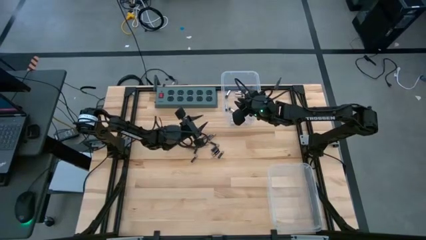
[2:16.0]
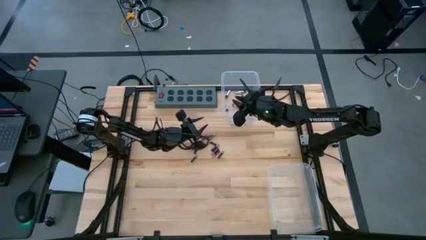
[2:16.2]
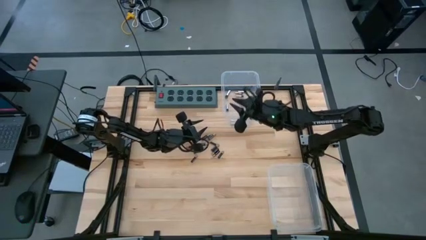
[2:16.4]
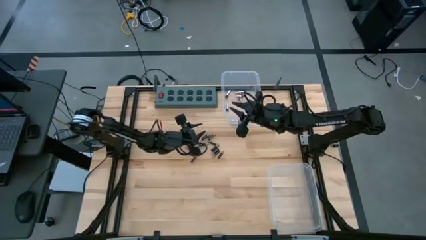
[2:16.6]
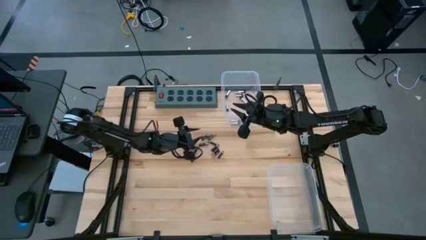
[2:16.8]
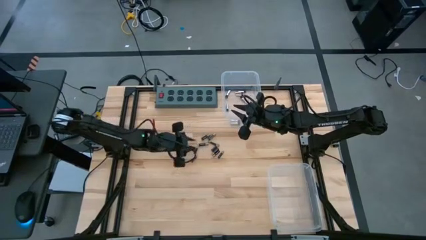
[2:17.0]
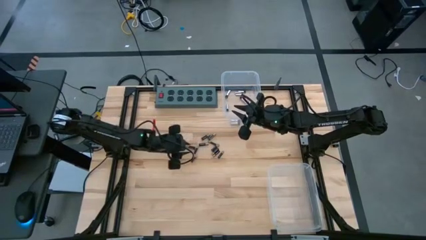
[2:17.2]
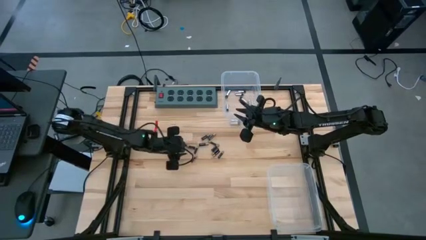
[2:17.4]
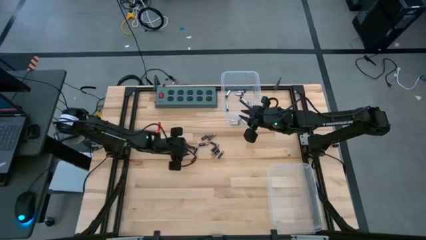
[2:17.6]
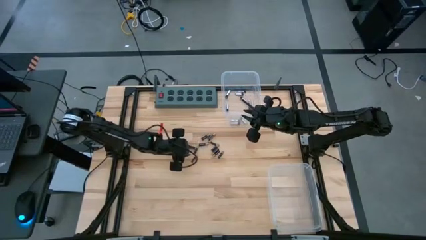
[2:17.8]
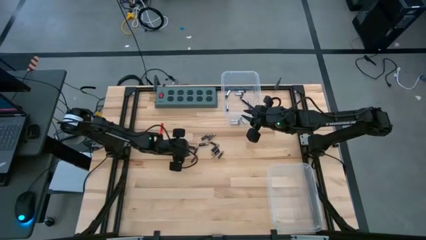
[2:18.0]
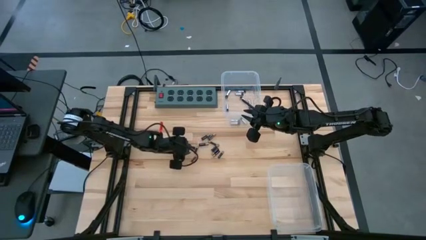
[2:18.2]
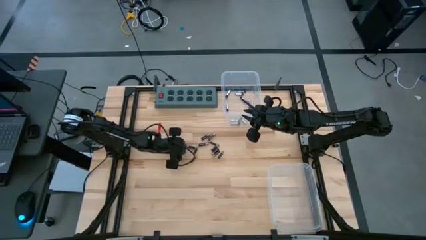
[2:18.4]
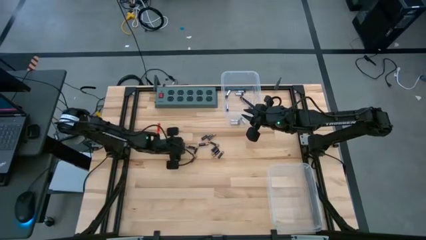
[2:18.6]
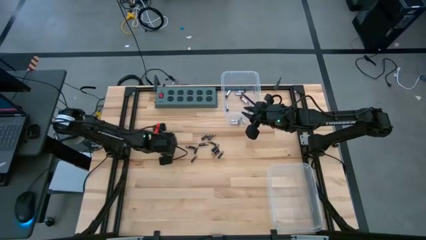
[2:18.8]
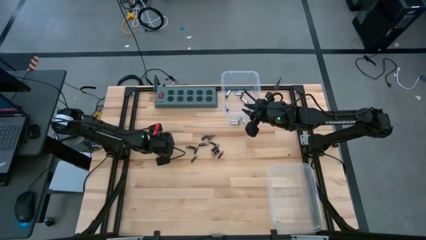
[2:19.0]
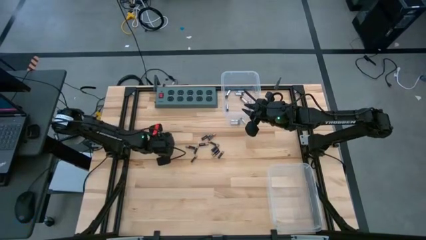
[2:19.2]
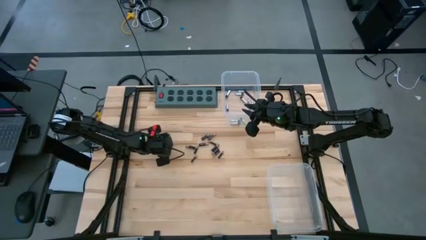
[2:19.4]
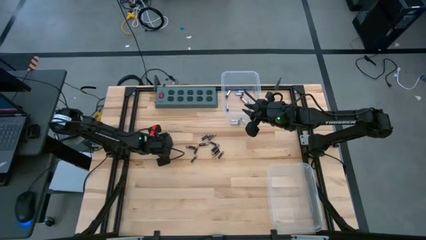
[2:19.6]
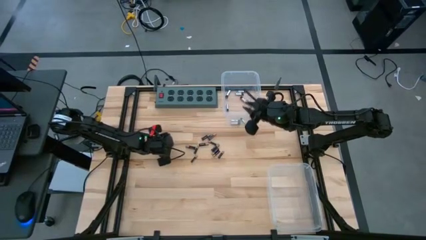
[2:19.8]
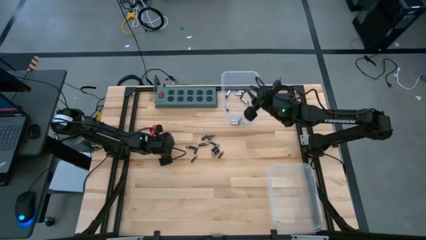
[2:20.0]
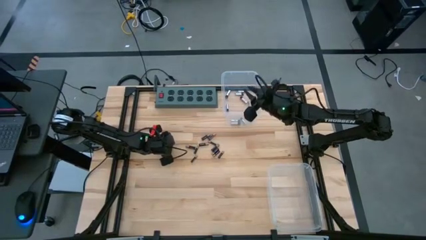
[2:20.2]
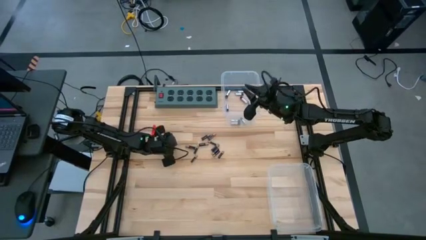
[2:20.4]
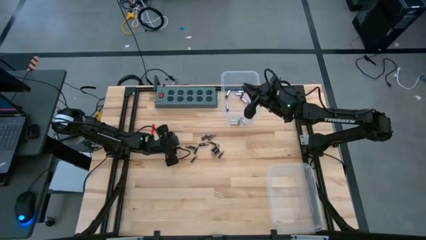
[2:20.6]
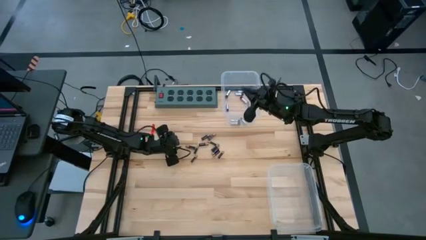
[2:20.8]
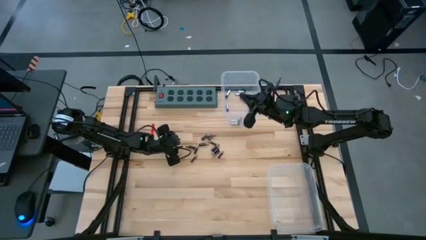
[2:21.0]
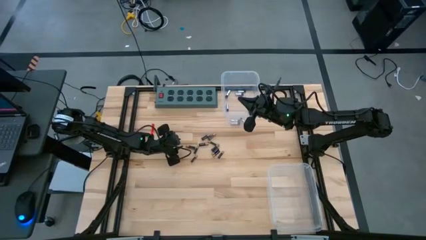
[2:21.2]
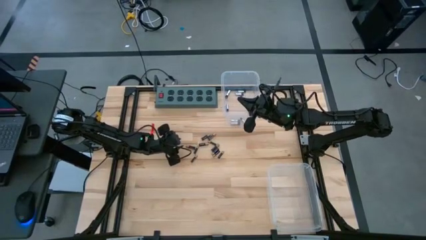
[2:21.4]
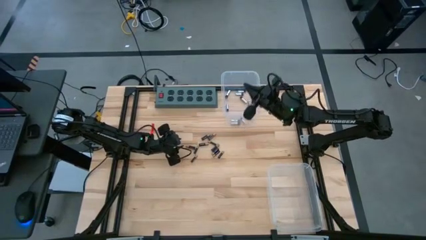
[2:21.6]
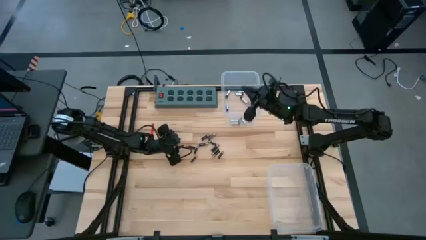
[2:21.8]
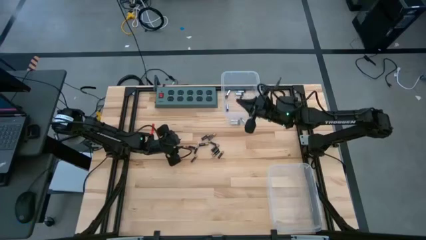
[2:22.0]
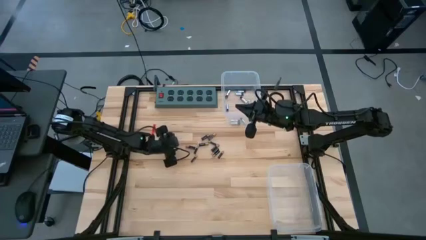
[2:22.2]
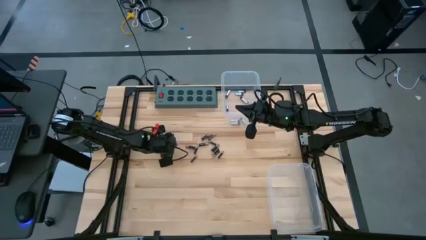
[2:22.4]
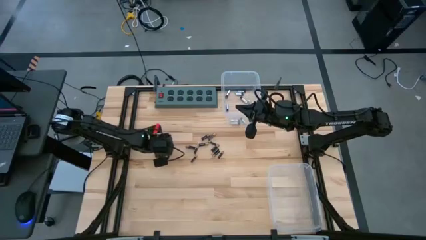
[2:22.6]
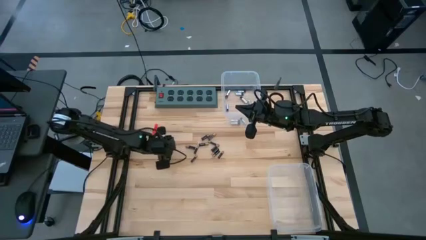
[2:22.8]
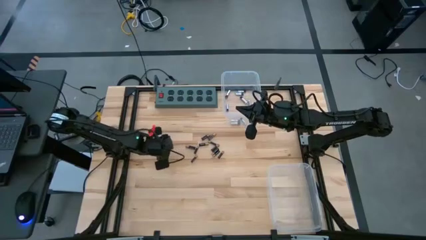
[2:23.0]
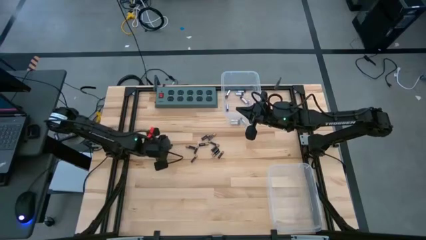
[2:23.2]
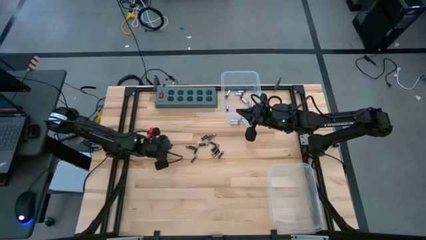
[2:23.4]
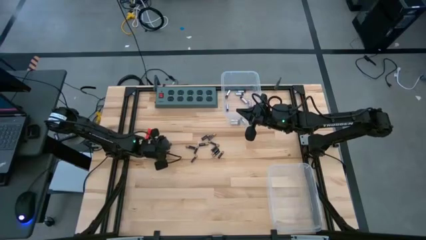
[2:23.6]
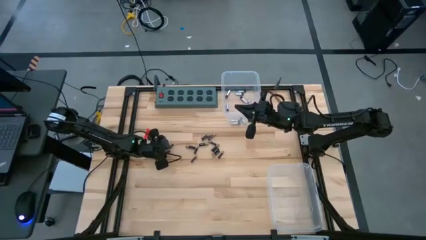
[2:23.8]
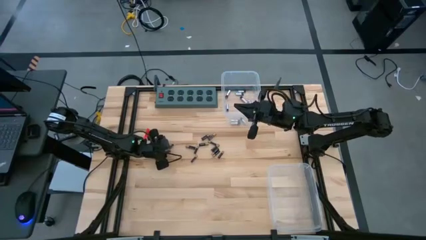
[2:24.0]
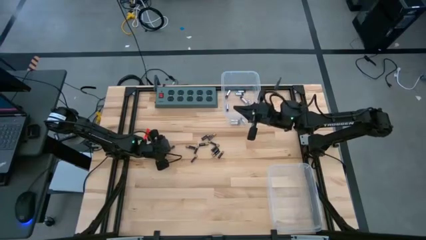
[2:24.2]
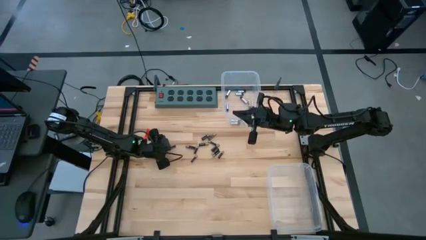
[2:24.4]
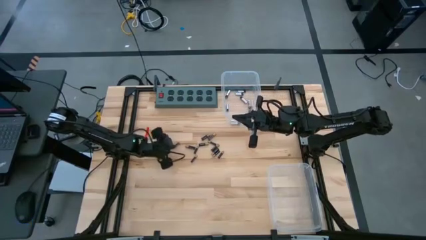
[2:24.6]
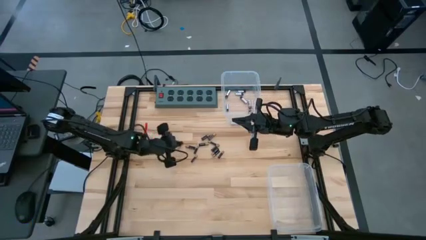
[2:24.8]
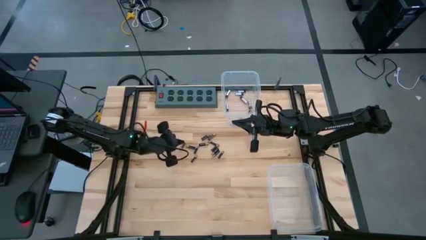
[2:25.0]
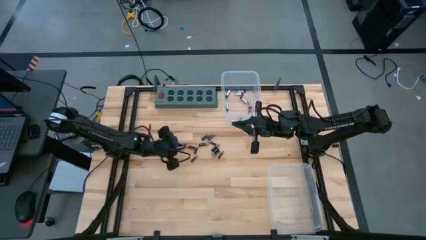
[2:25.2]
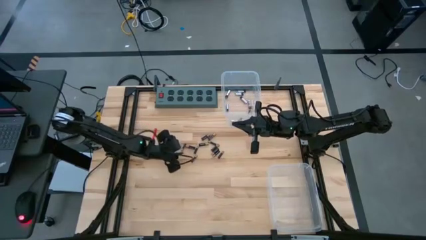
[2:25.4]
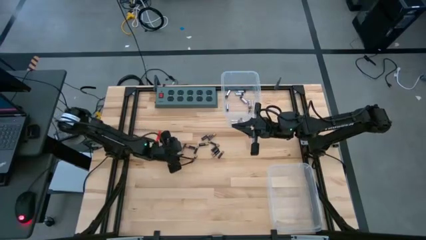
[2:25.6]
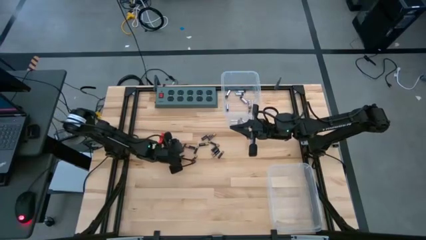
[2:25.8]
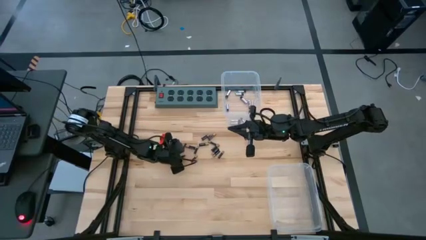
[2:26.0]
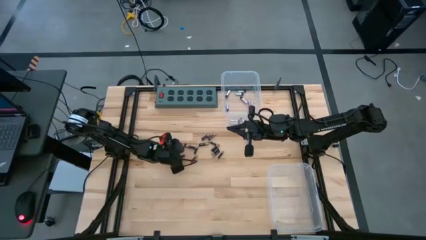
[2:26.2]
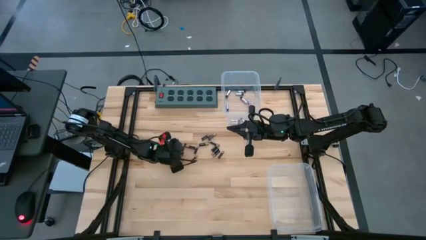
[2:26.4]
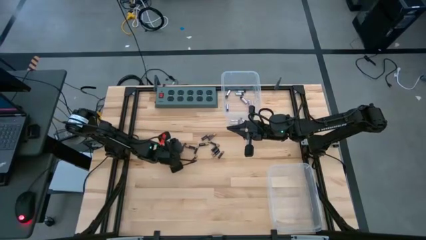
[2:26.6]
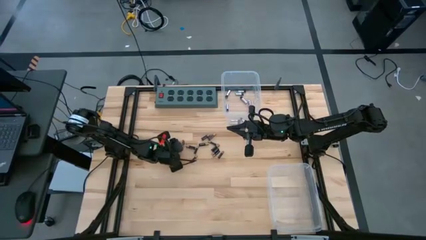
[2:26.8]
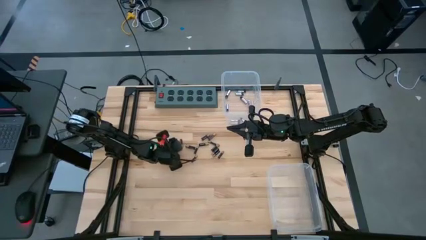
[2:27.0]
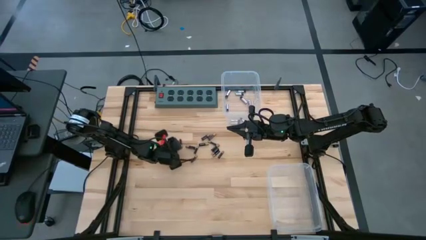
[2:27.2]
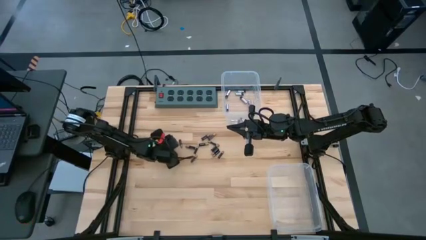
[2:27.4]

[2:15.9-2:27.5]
Task: Sort batteries
Put the black battery into the bottom transparent bin

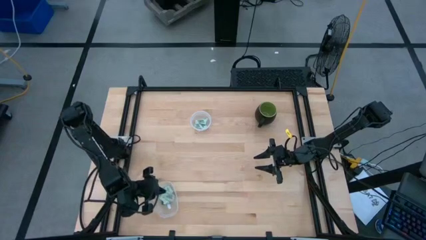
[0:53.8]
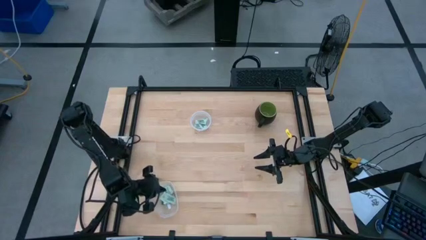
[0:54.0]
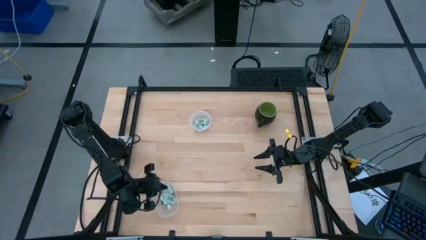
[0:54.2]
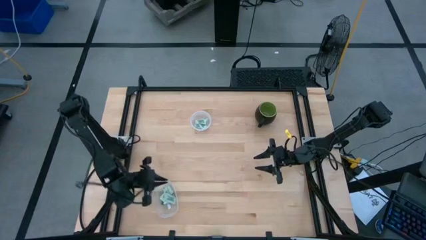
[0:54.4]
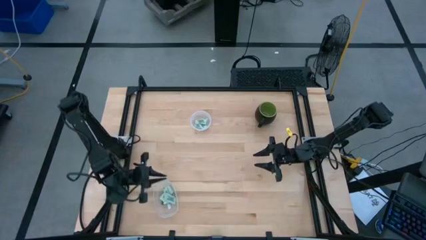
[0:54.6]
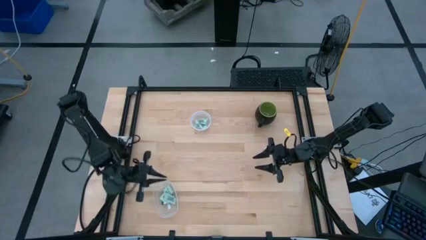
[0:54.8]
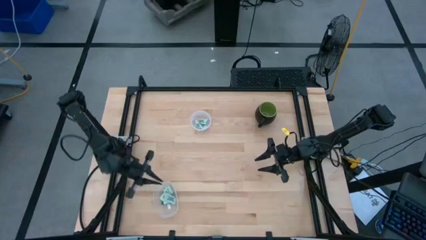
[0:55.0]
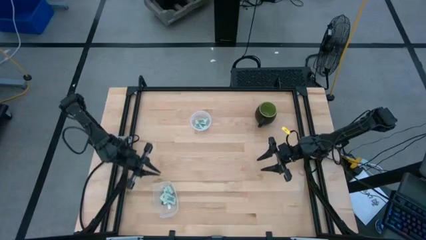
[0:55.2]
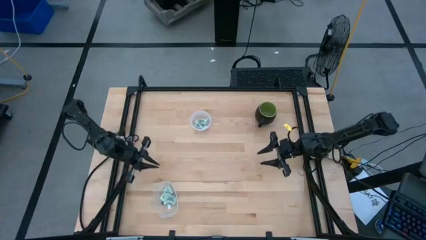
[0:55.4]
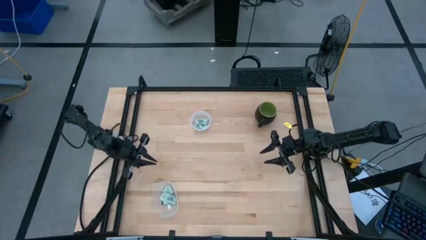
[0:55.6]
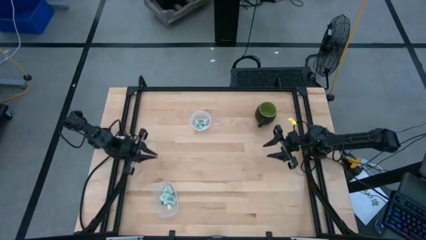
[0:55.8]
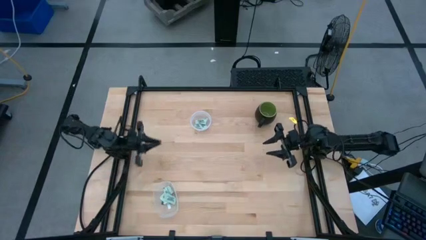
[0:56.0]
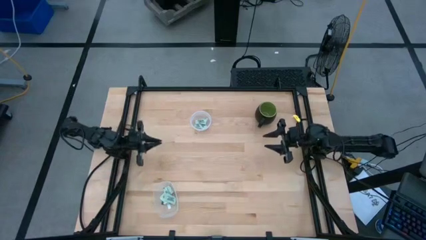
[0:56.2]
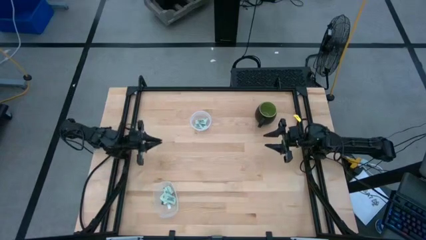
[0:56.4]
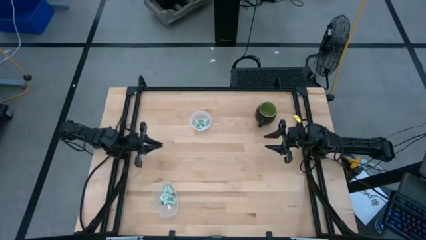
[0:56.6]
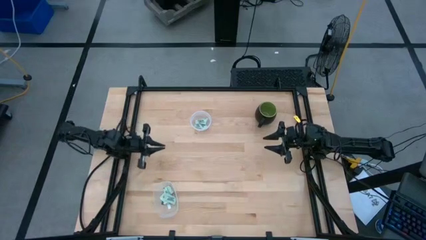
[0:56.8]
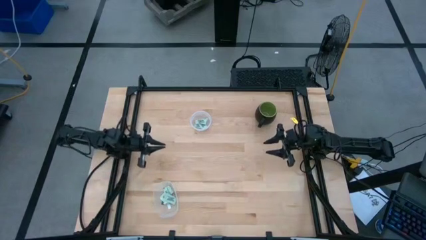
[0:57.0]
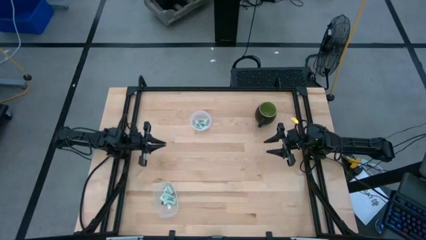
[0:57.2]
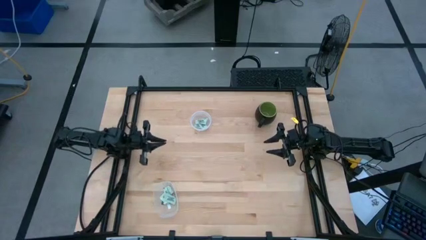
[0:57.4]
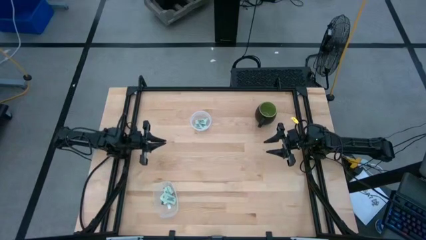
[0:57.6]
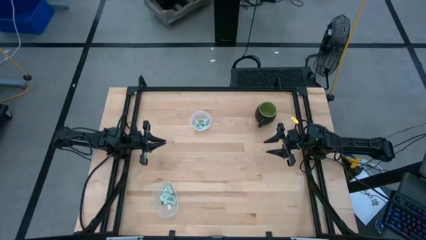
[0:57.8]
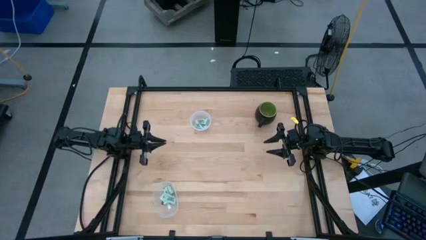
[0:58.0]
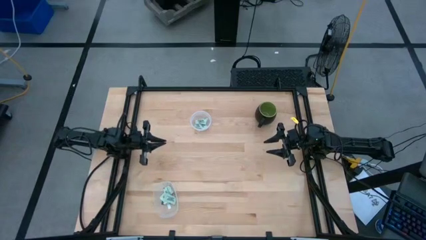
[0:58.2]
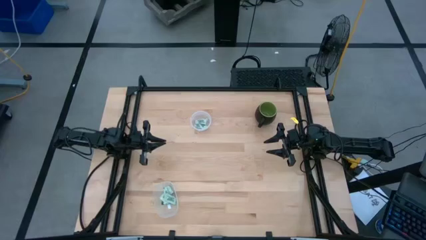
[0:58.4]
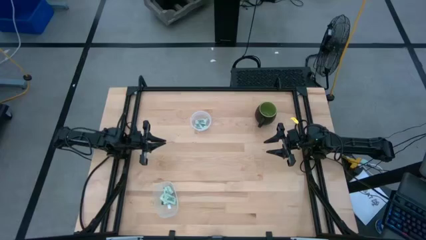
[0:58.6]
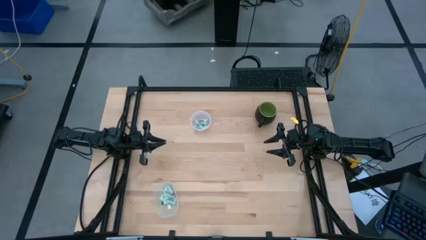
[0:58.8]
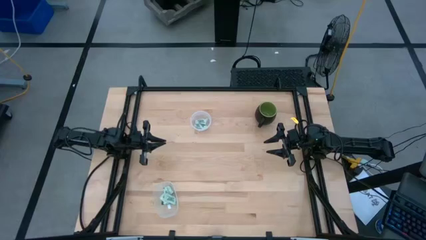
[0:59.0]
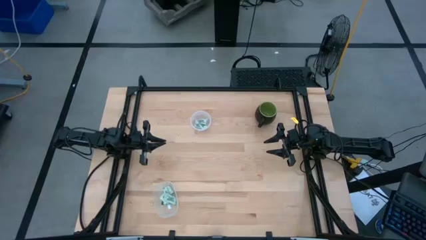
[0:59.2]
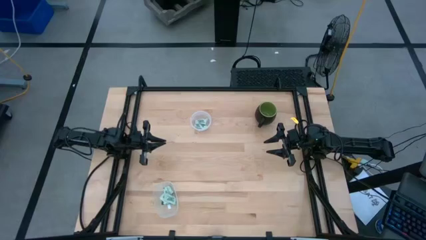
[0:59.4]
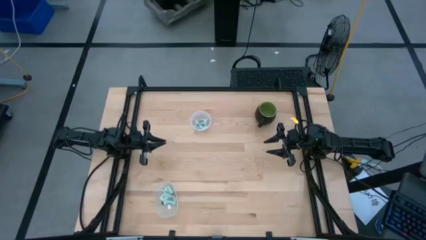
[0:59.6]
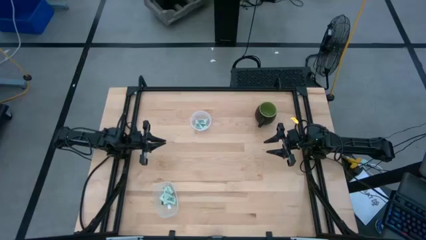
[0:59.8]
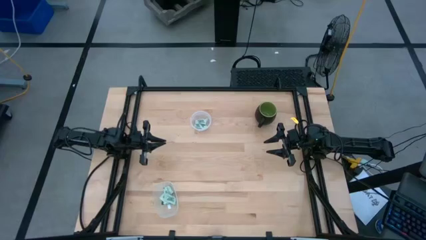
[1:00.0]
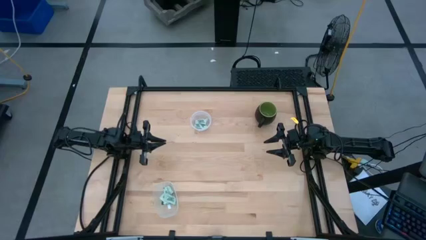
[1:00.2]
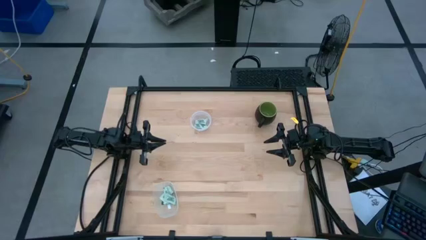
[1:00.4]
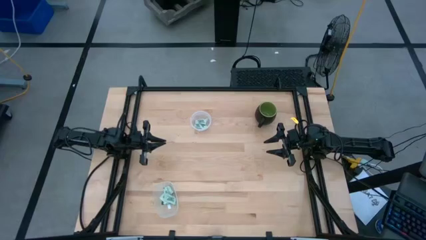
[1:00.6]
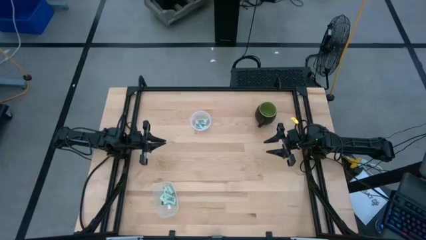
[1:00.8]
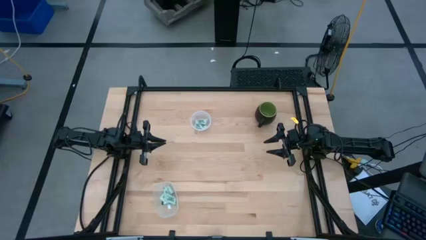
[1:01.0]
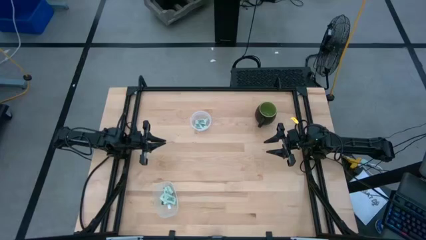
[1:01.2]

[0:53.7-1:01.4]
Task: Pick and place Stevia / Truvia into bins
Return to Home Position
